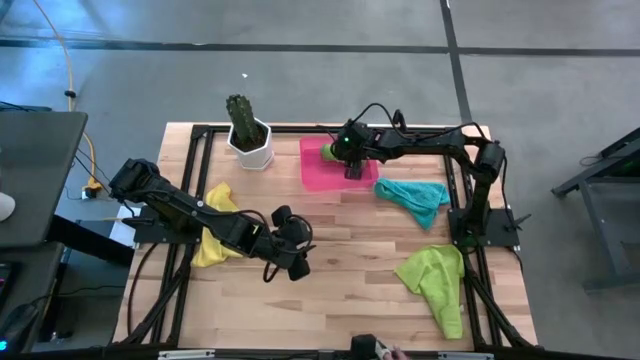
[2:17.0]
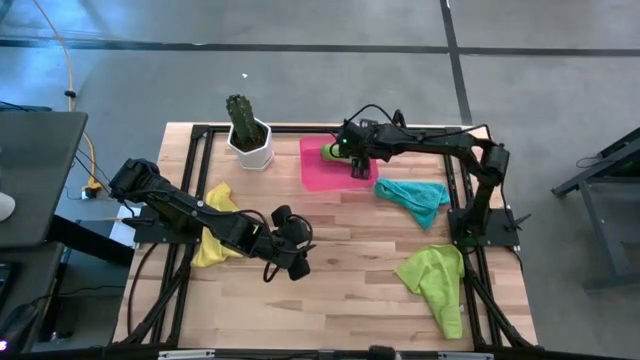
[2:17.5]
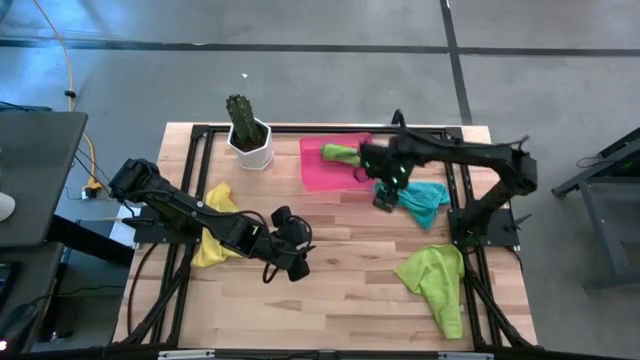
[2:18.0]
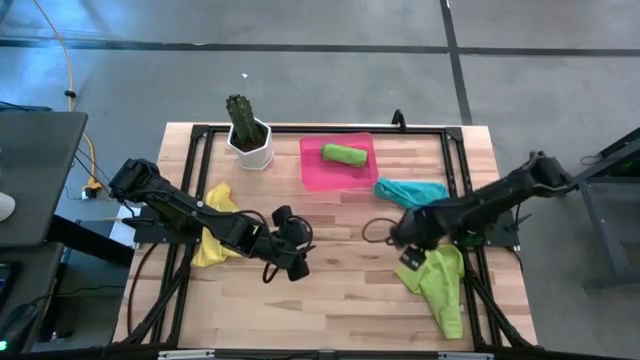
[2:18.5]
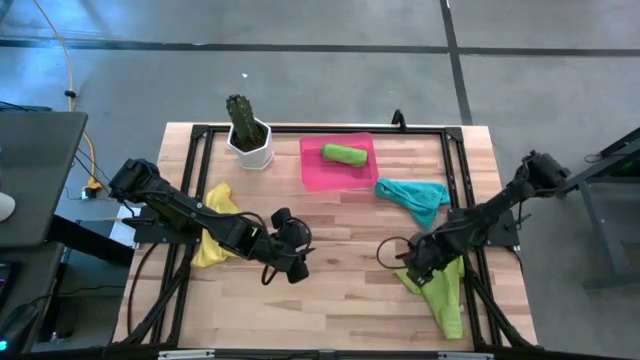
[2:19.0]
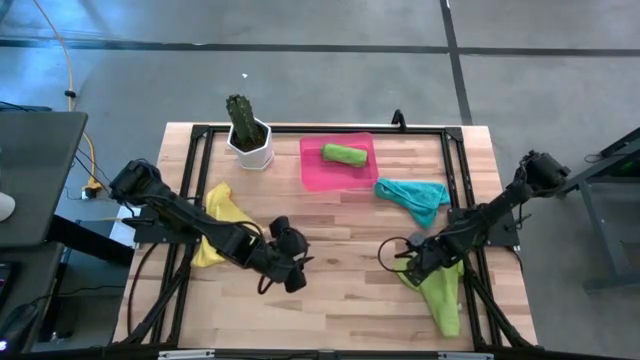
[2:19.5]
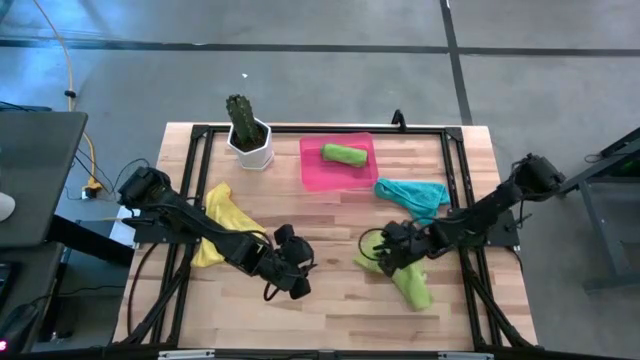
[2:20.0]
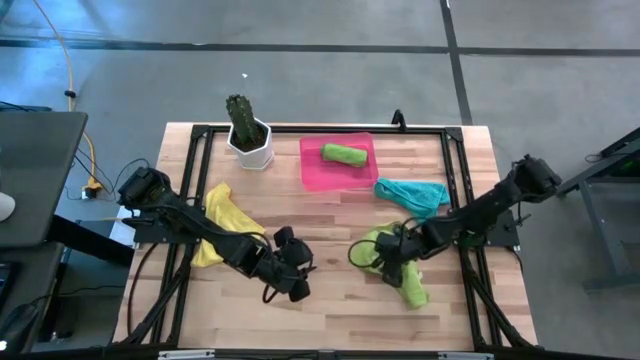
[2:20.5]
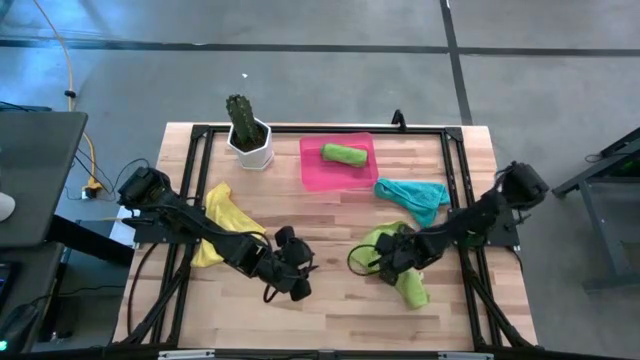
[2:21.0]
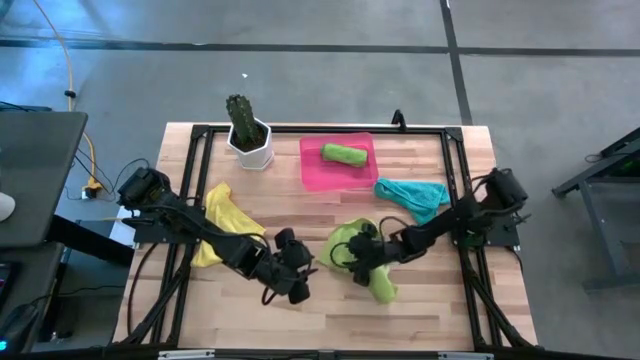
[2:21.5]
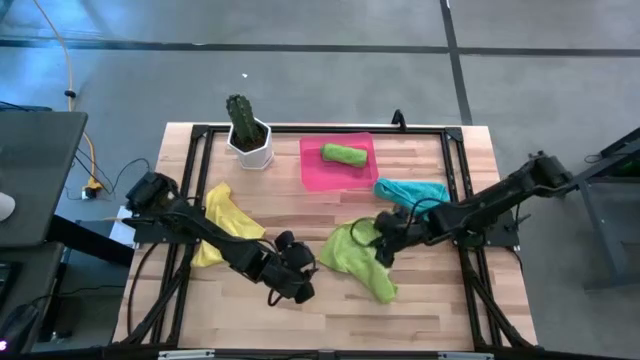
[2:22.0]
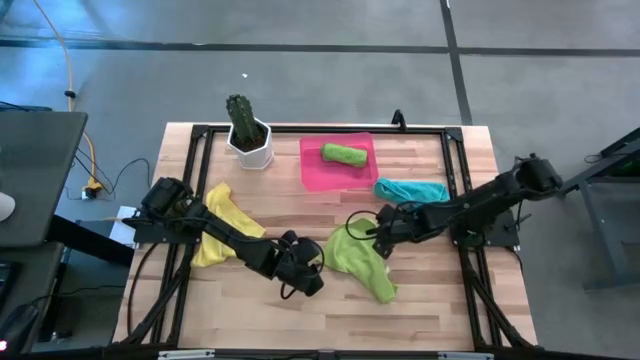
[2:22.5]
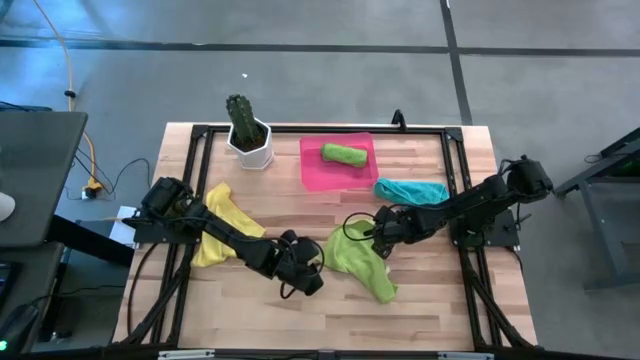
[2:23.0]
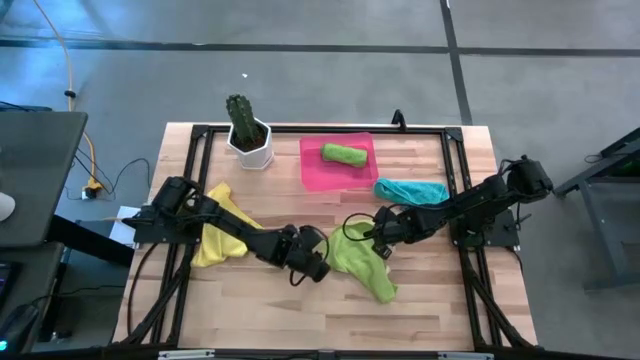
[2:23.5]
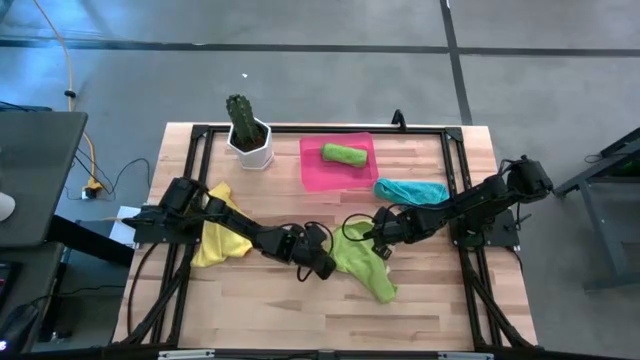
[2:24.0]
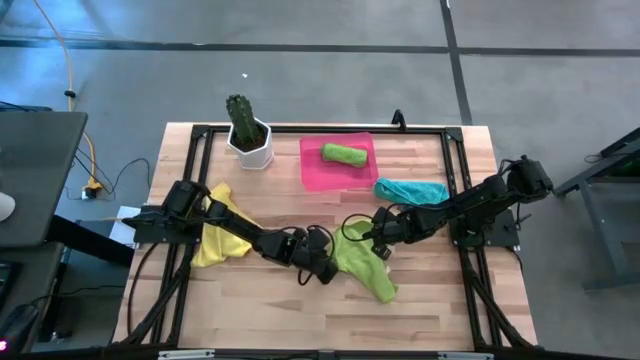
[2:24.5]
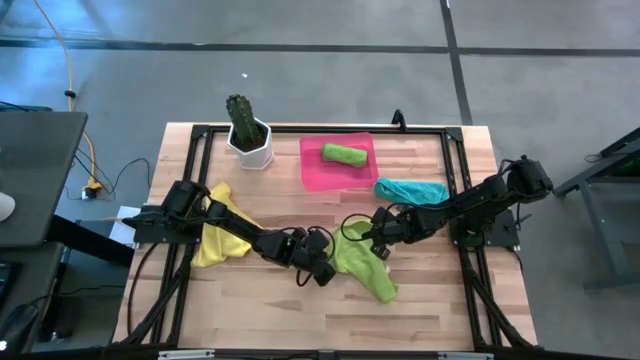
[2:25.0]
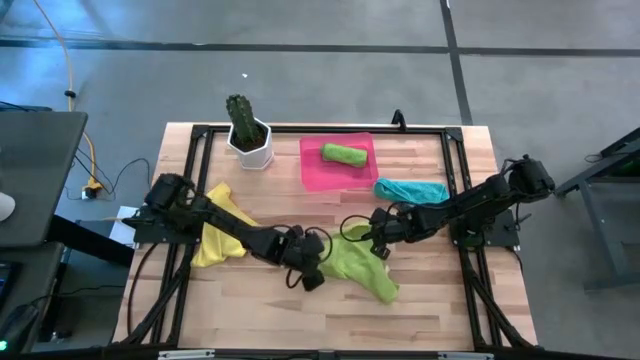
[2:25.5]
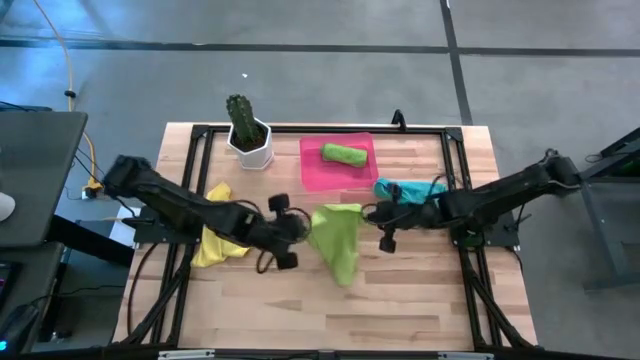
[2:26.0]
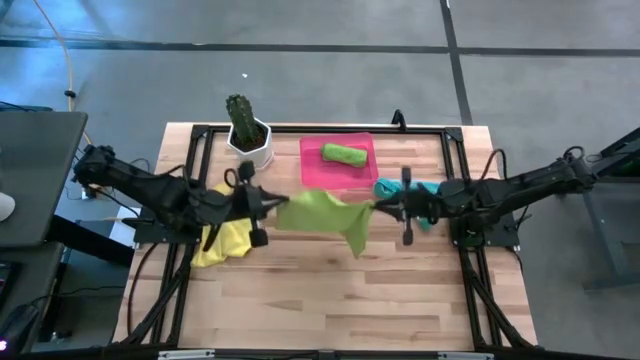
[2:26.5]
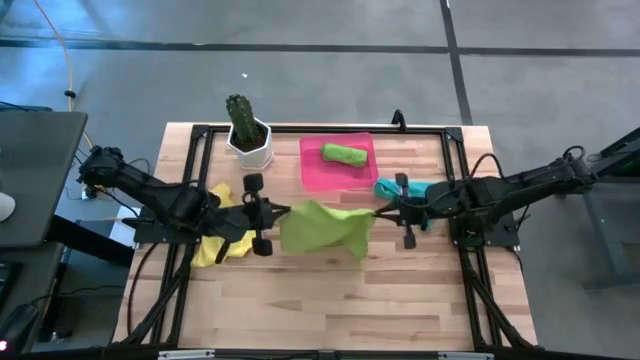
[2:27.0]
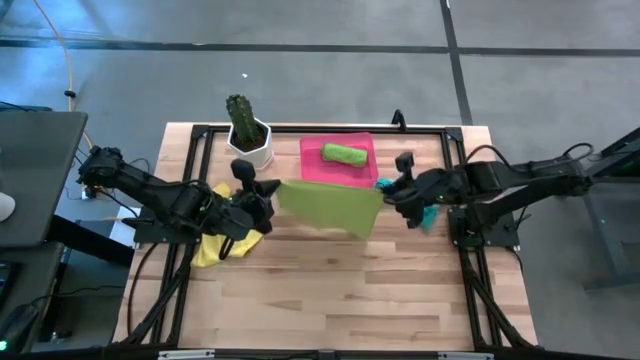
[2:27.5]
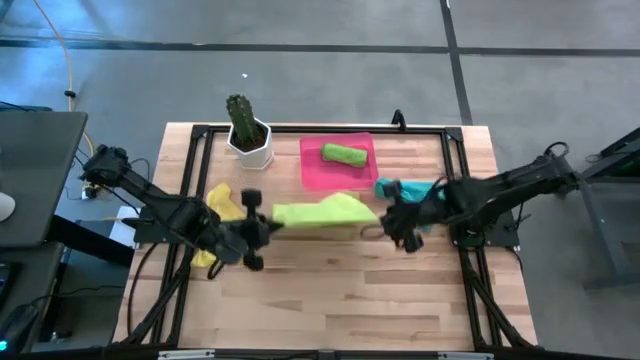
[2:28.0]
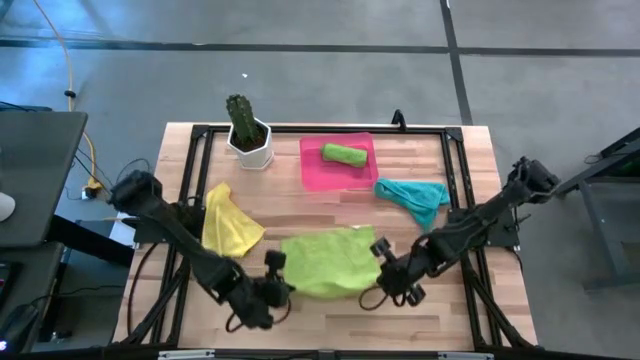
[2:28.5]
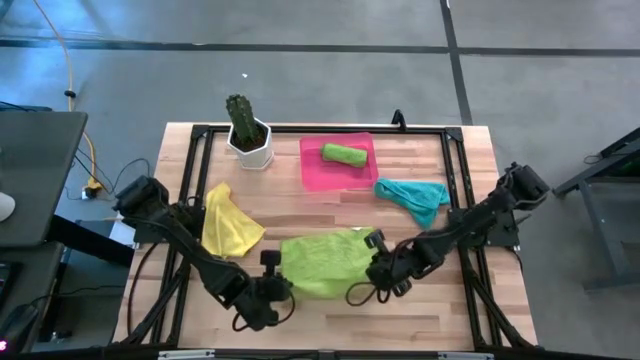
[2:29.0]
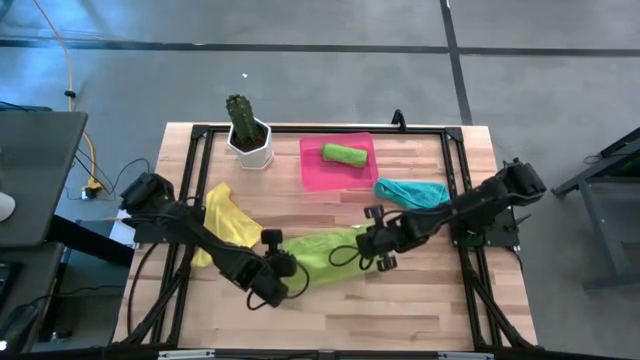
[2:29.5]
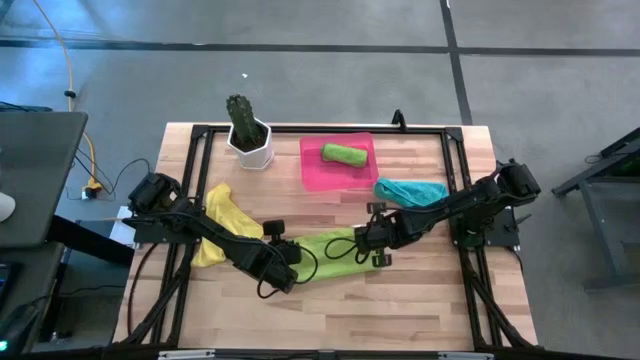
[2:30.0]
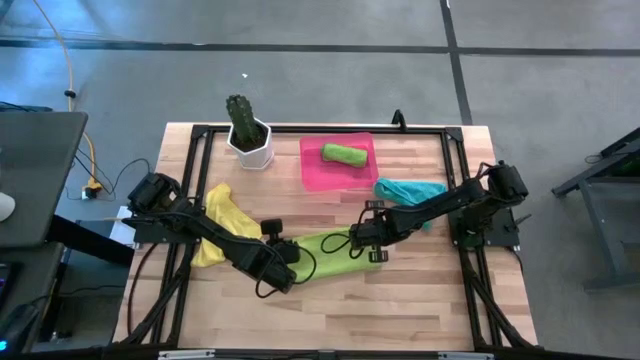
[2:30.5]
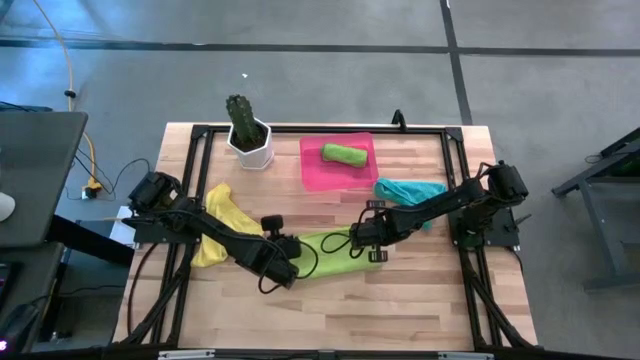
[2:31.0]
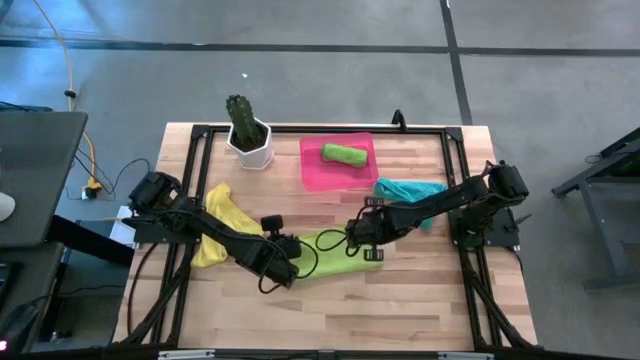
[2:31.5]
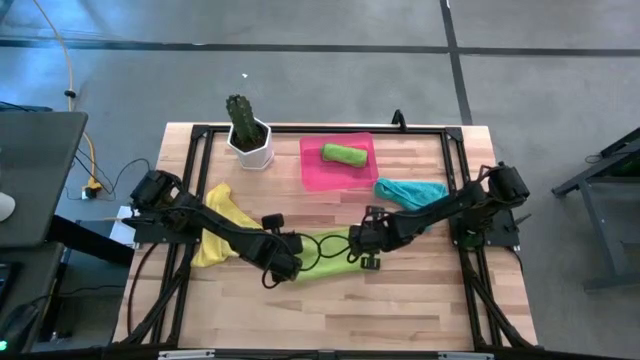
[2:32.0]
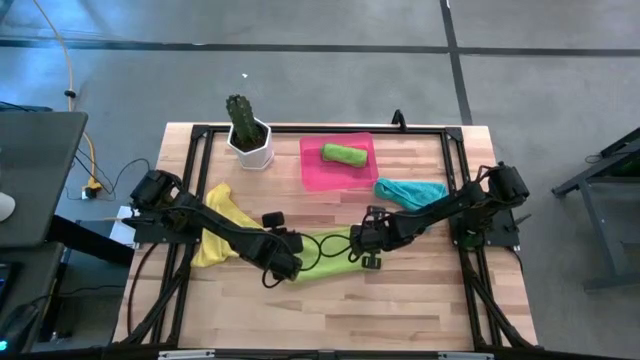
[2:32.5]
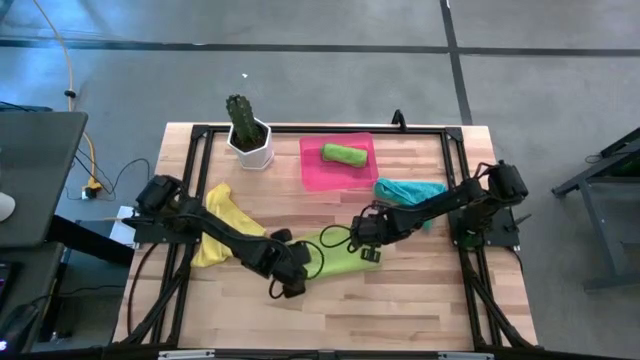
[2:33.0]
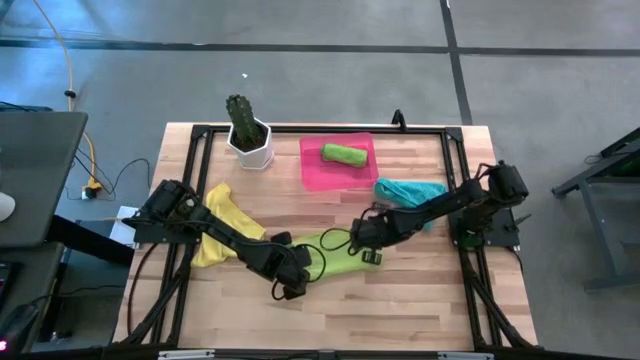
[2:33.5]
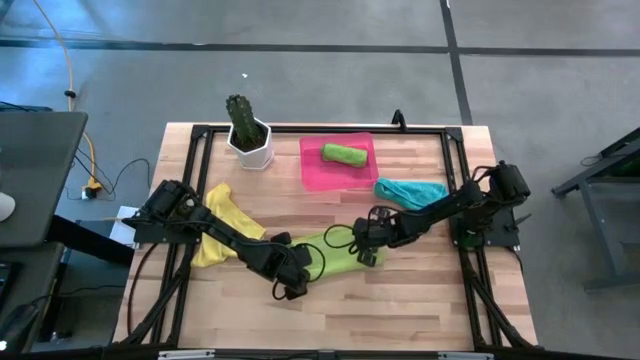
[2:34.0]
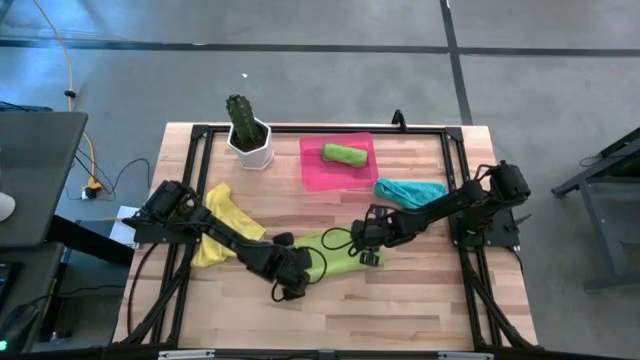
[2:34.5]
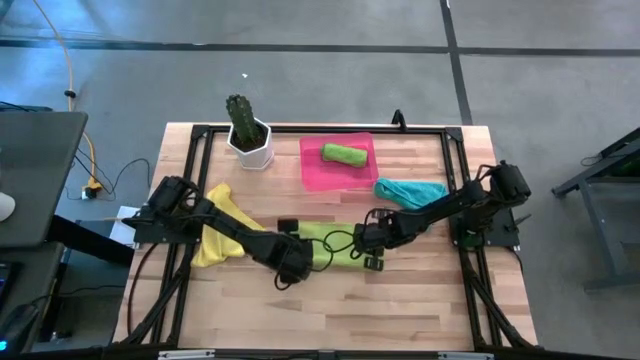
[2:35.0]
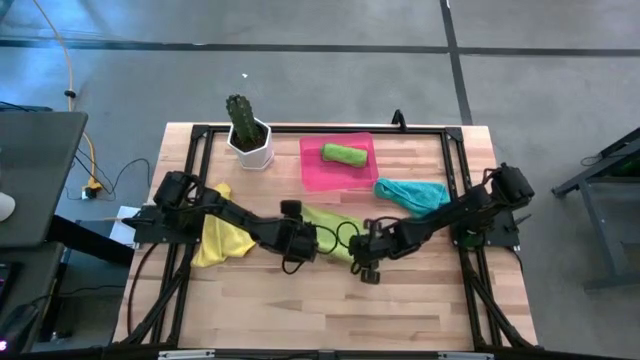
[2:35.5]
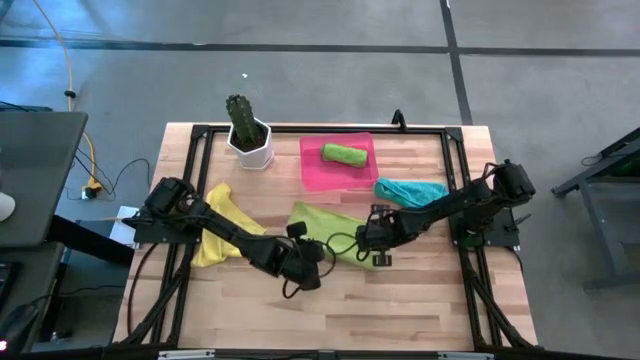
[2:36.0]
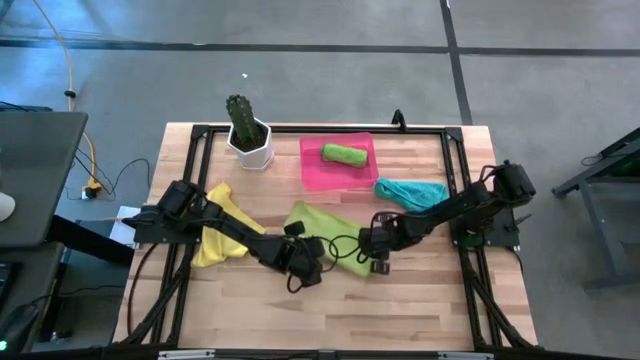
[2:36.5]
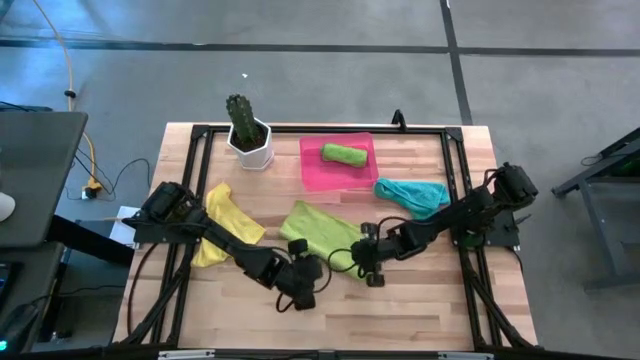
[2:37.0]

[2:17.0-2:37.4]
Task: Roll microfiber towels into tight, uniform cylinder then place into a basket
Roll the light green microfiber cloth

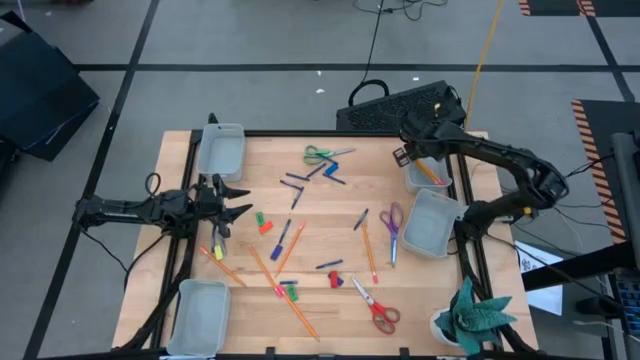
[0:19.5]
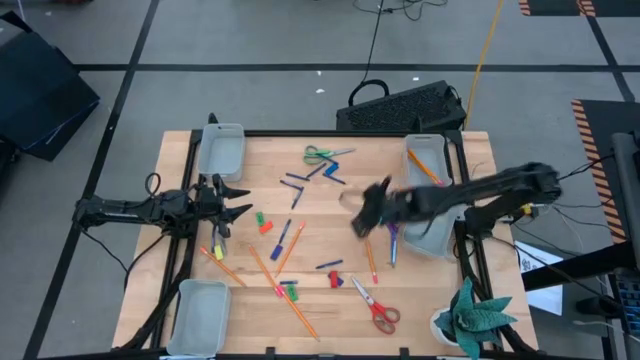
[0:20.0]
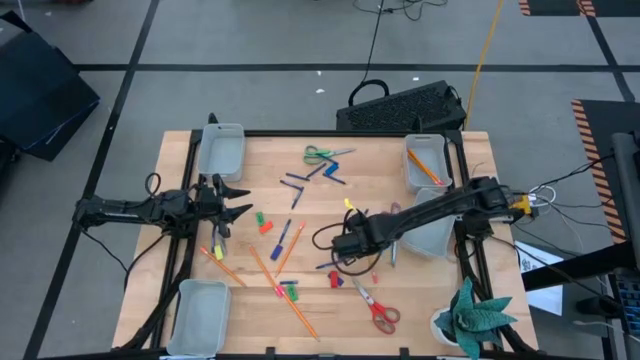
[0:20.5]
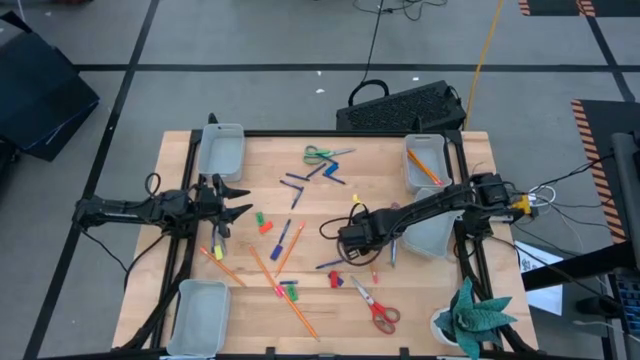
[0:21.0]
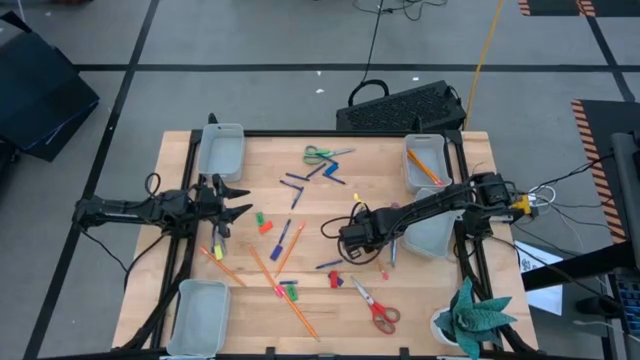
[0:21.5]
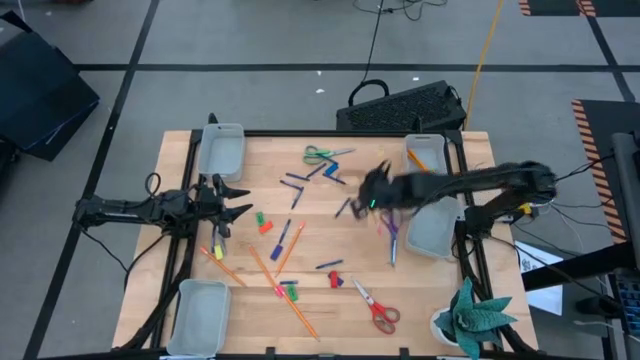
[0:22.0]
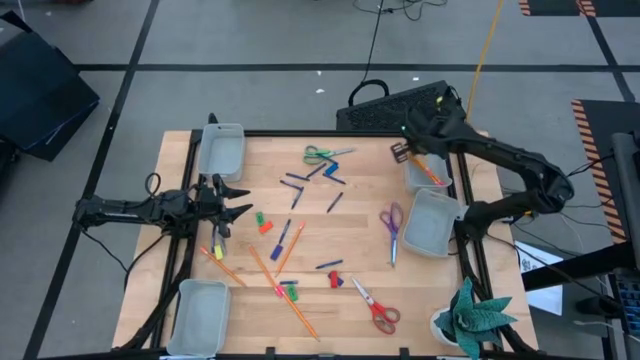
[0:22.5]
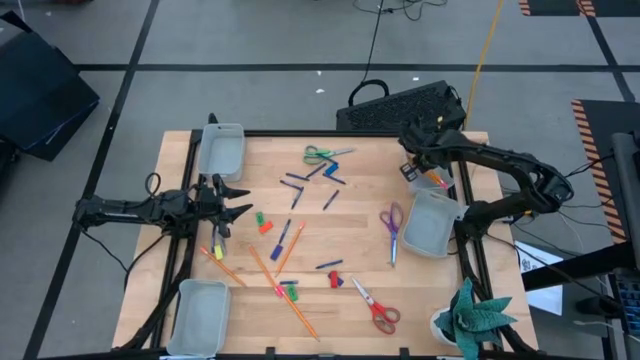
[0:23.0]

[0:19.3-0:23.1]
Task: Sort crayons/erasers/pens/pencils in bins
Put the orange pencil into the top right gray bin
